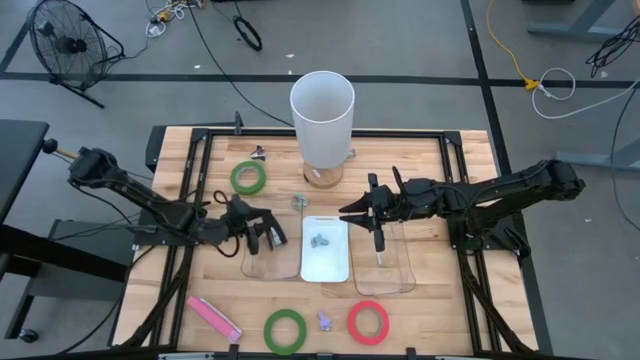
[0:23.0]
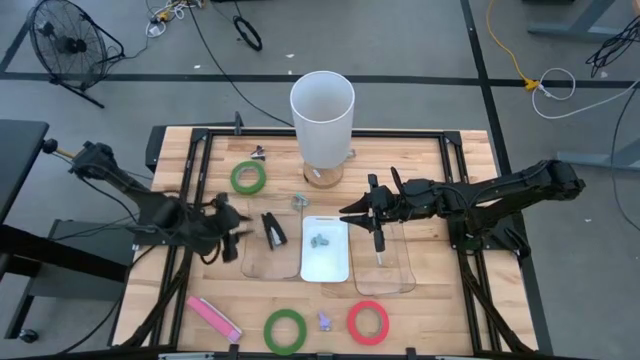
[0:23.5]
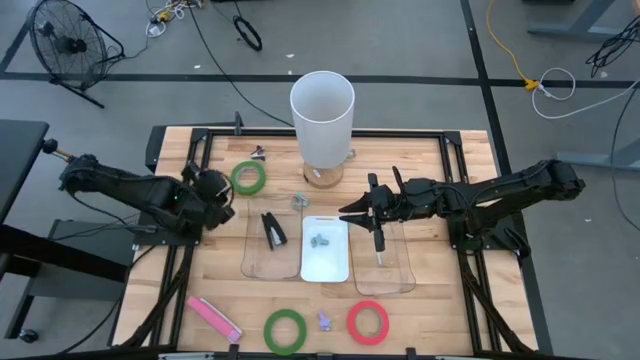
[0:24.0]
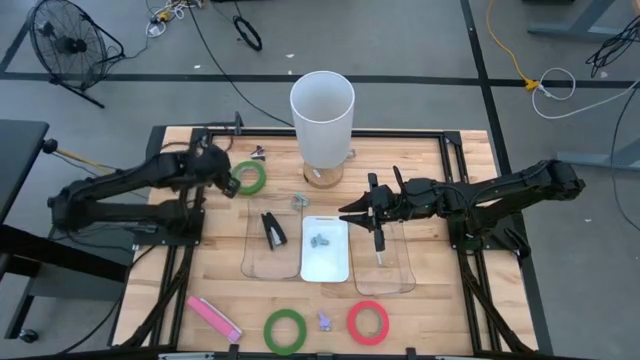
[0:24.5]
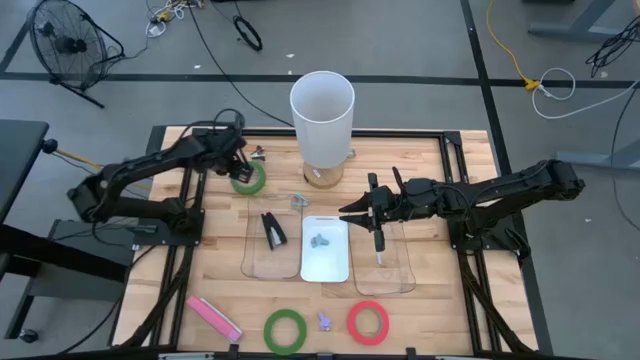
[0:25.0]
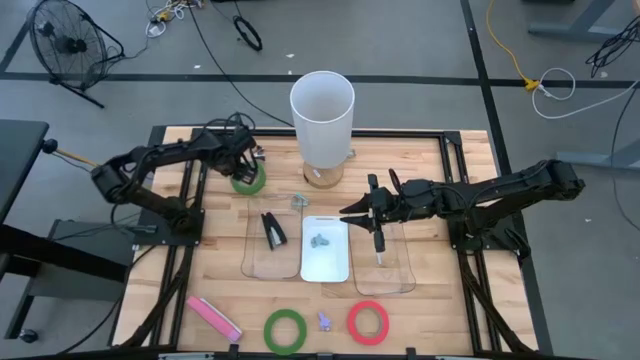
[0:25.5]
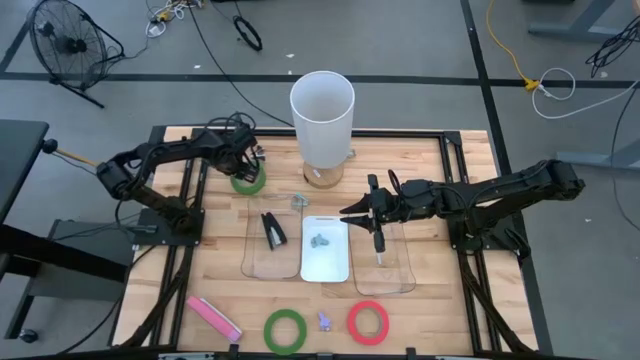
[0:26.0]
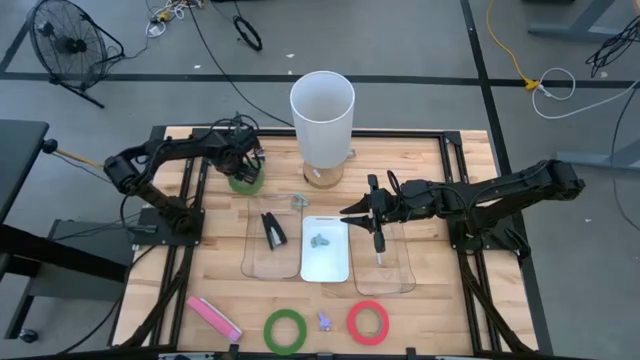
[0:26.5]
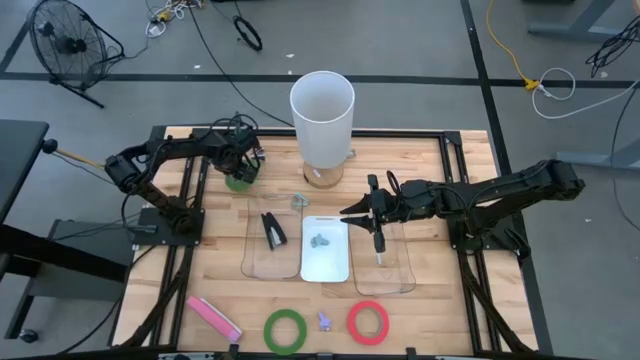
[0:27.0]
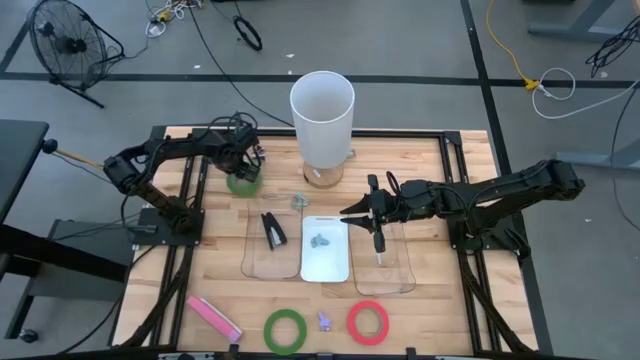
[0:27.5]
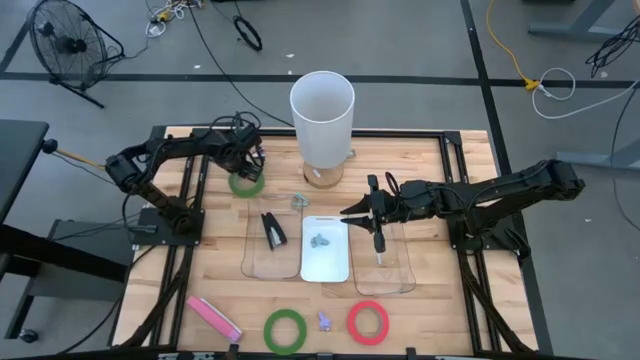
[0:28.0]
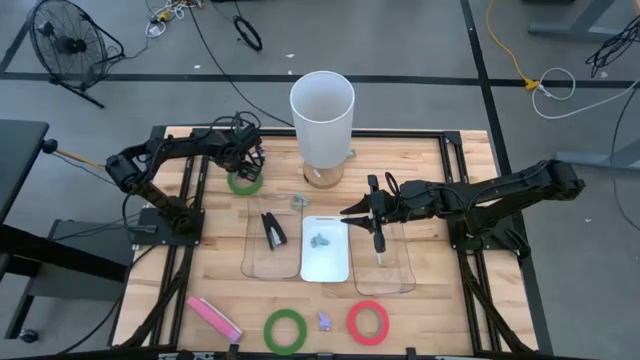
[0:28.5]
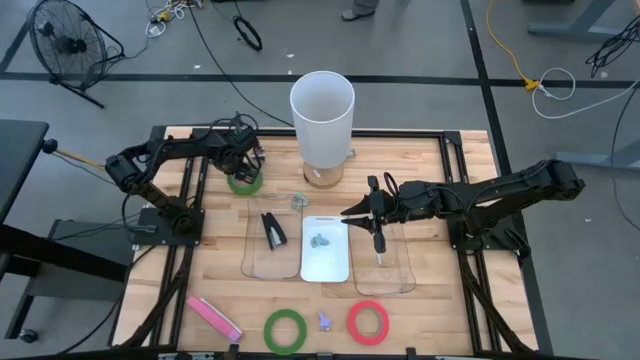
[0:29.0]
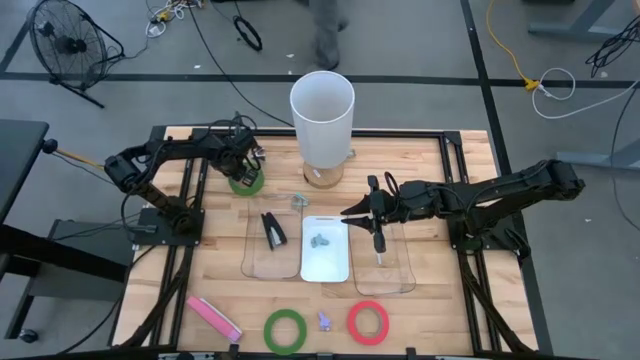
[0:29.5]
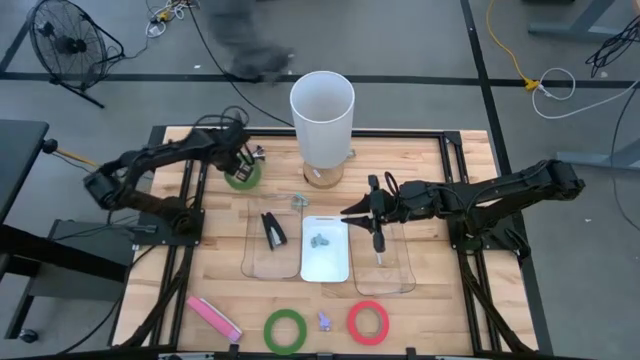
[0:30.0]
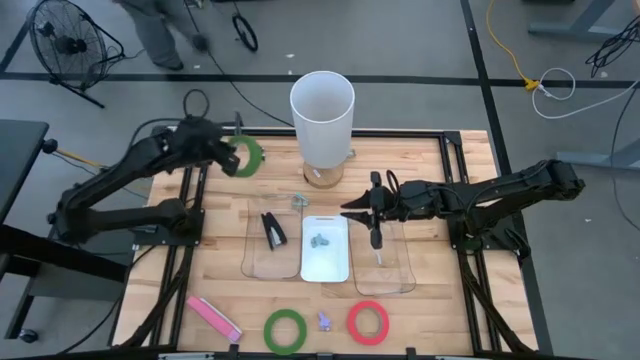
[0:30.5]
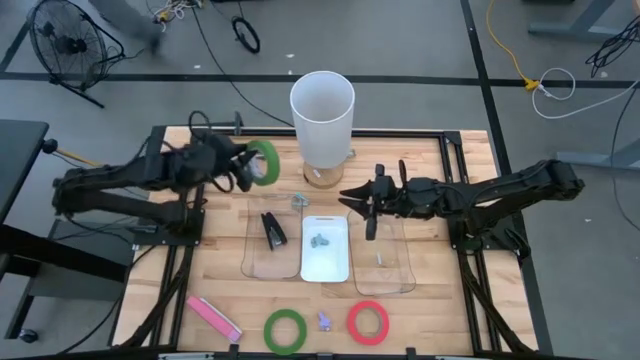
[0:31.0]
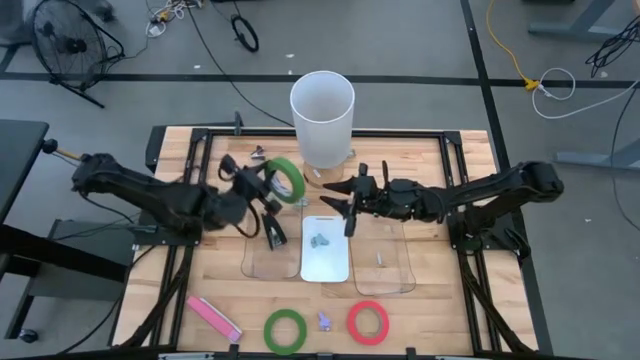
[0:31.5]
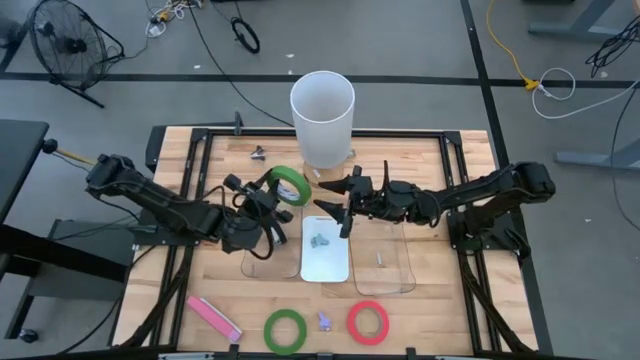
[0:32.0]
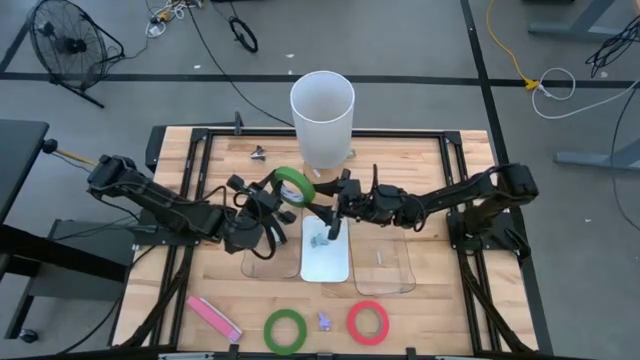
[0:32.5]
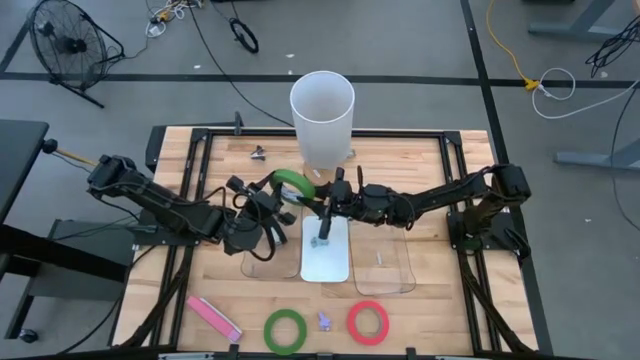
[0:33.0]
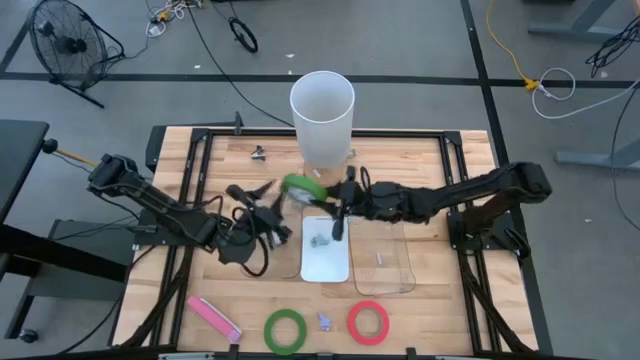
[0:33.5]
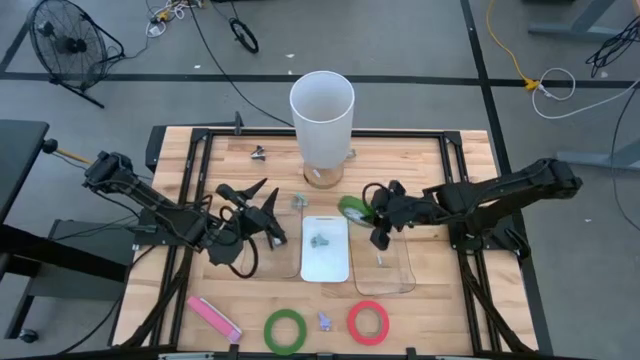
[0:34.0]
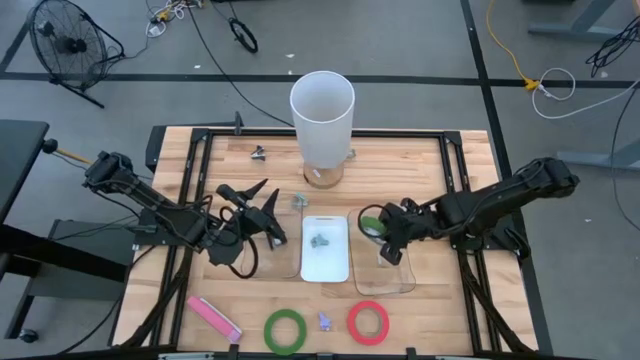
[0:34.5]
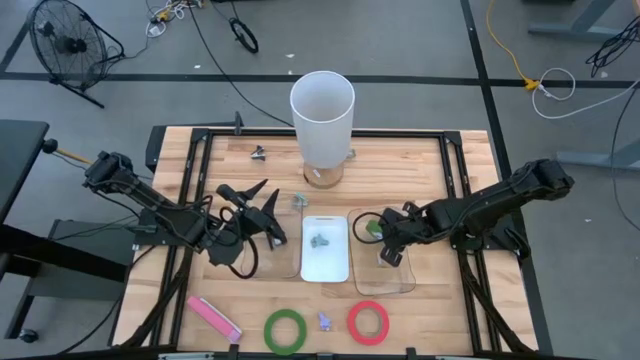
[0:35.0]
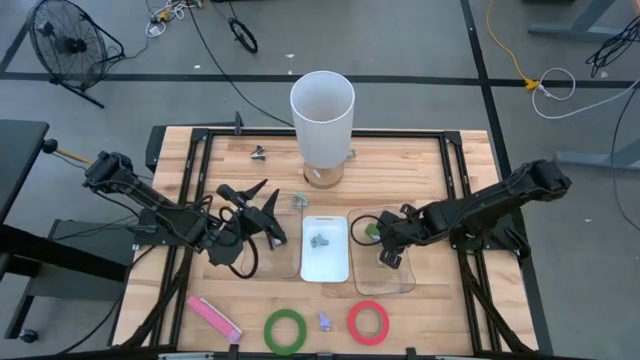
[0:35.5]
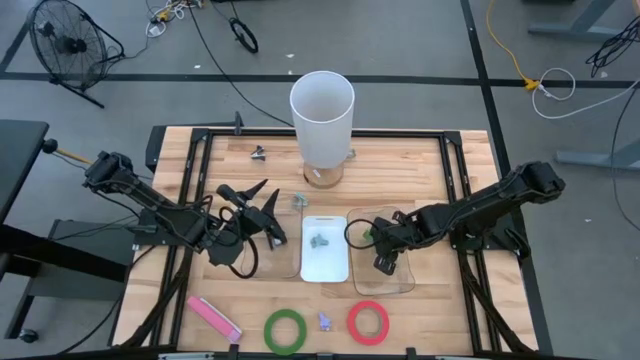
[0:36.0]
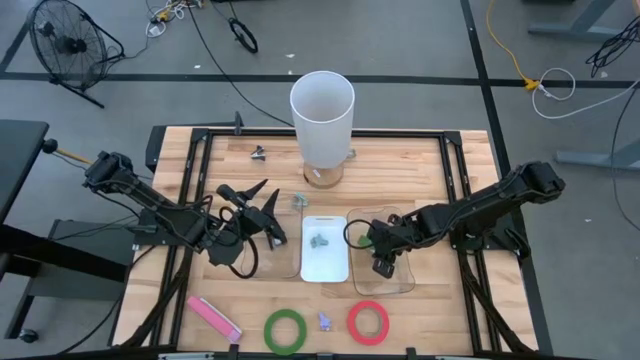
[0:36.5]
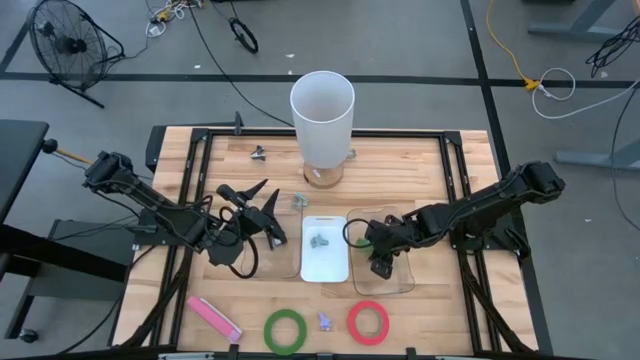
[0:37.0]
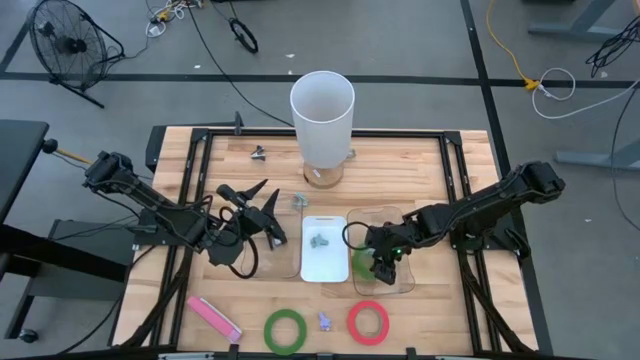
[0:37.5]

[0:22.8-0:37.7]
Task: Pick and place Stapler, Stapler remover, tape
Put the top green tape into the right transparent bin

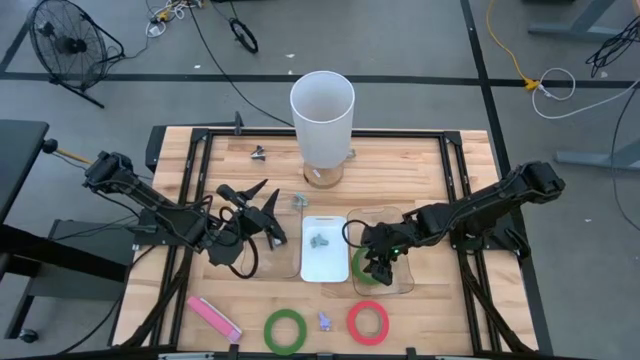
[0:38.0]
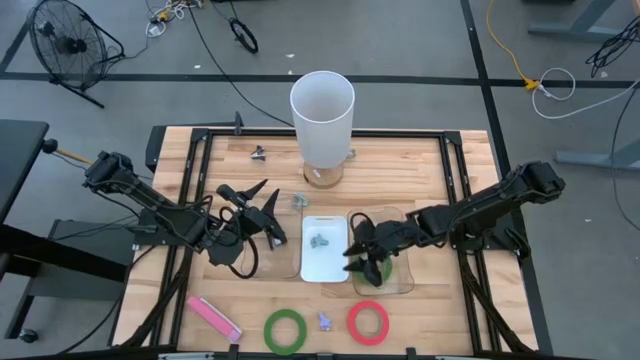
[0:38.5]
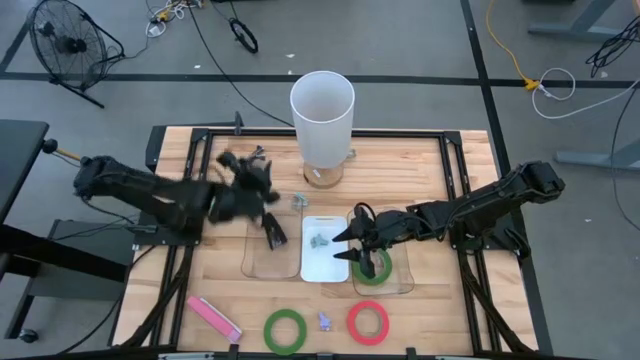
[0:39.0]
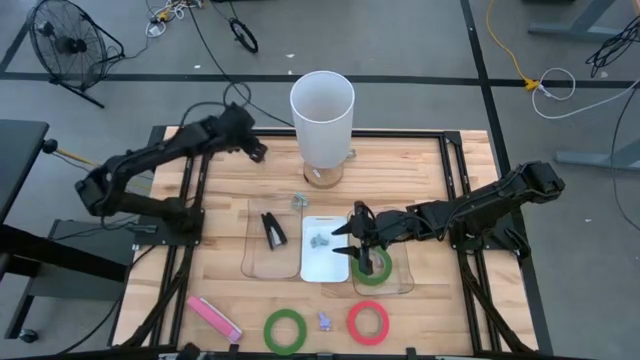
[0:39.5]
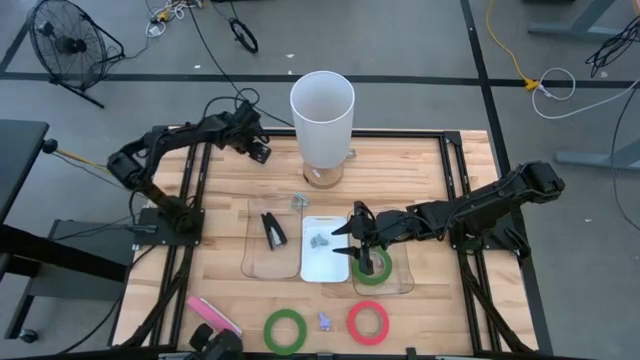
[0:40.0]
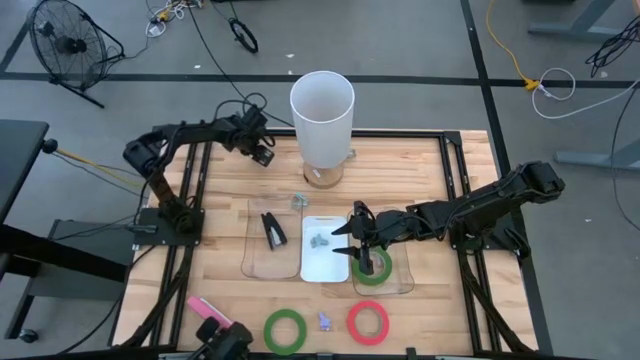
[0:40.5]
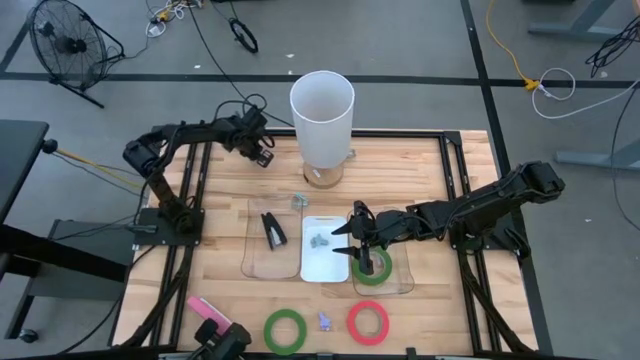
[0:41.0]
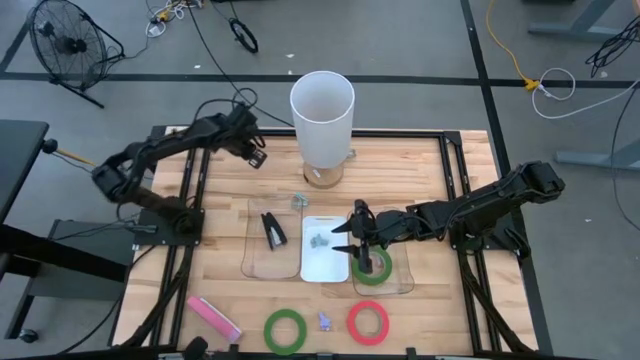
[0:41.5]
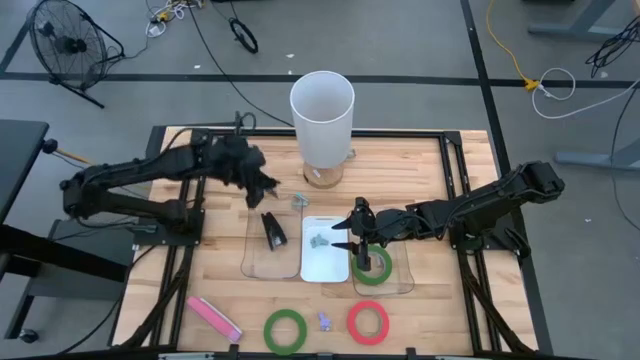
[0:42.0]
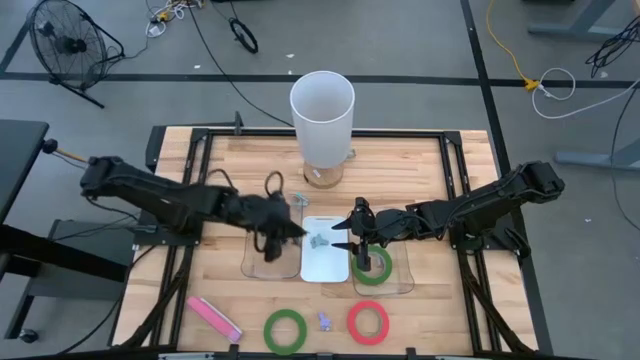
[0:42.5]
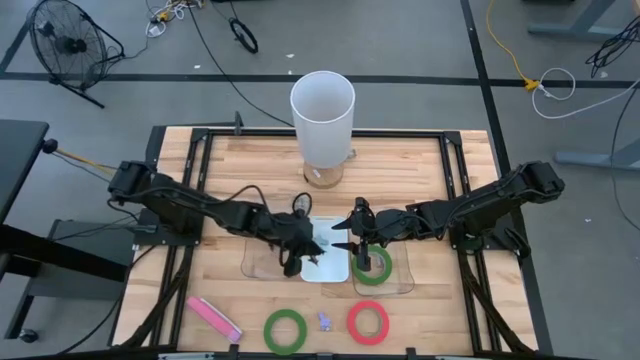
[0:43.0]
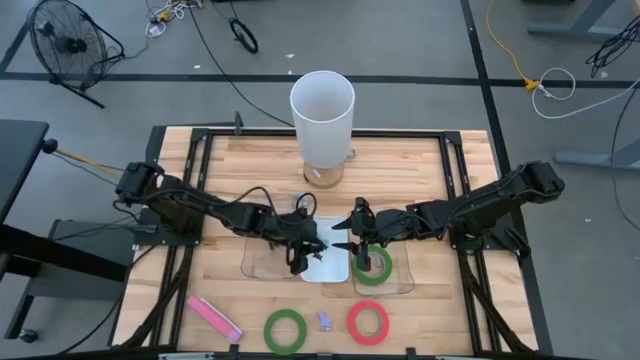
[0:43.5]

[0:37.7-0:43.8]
Put the black staple remover into the white bin
